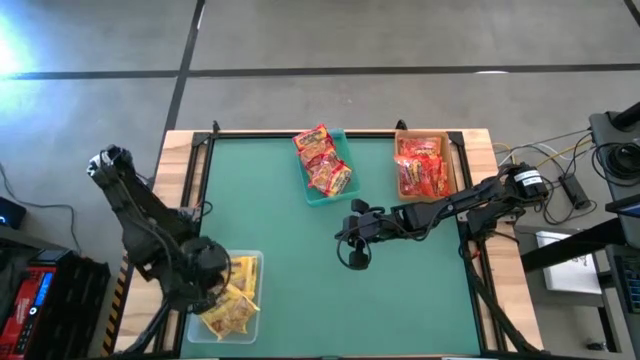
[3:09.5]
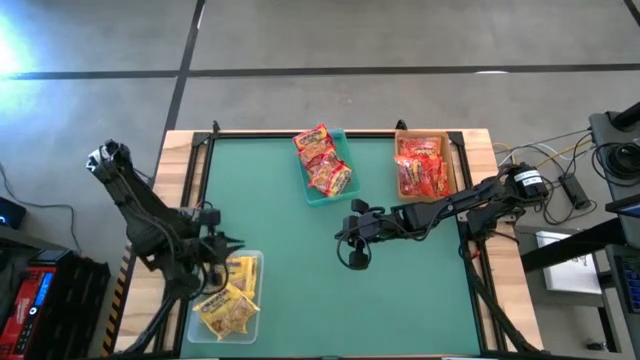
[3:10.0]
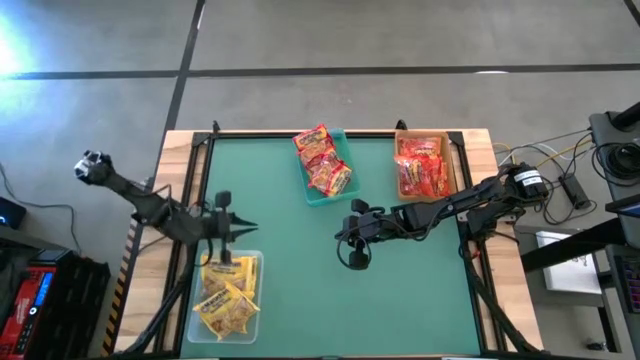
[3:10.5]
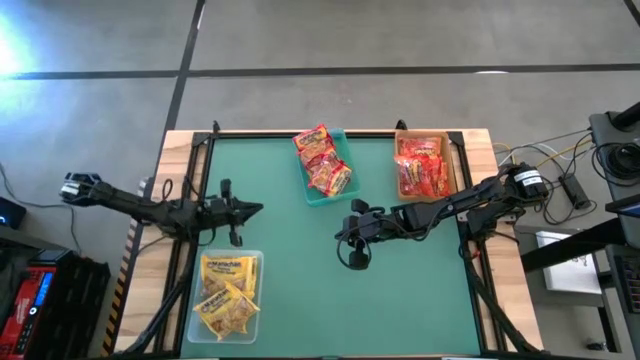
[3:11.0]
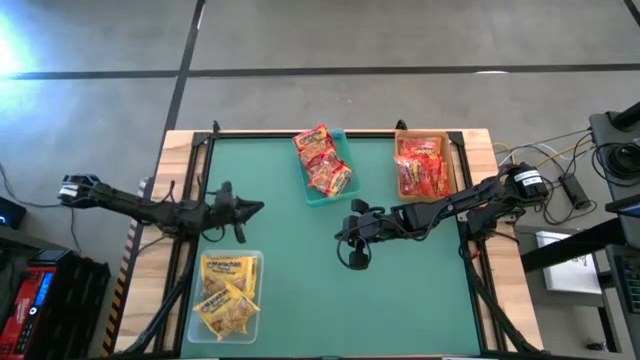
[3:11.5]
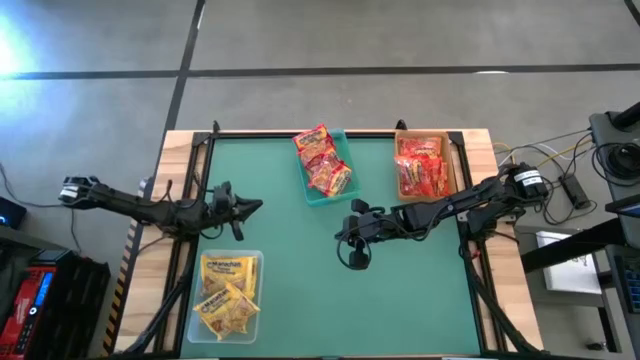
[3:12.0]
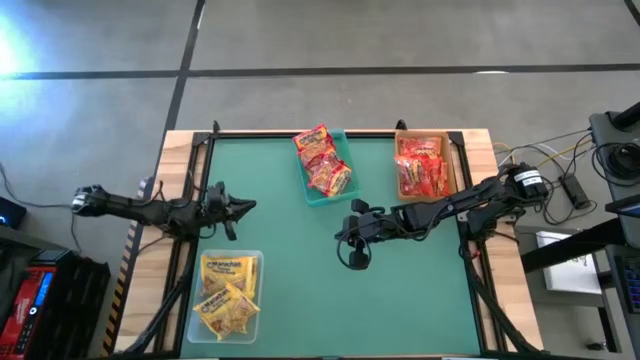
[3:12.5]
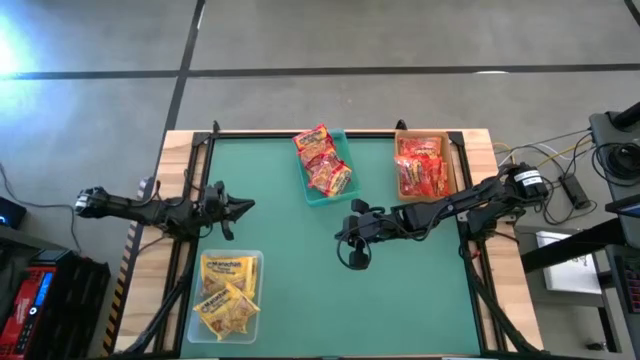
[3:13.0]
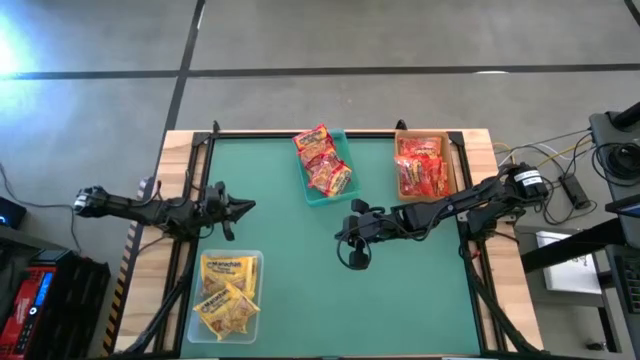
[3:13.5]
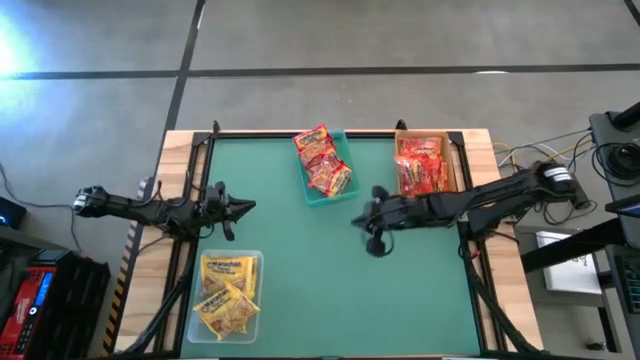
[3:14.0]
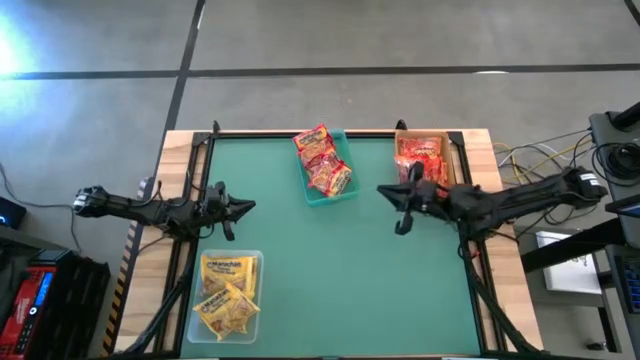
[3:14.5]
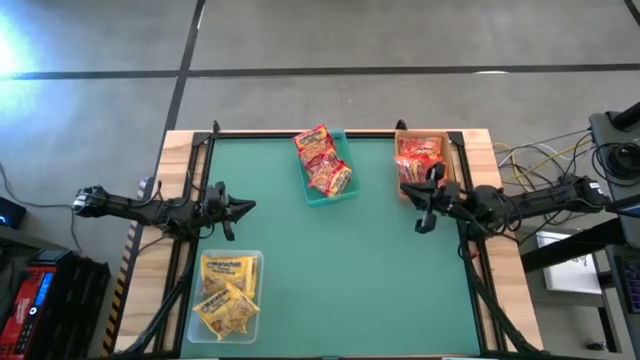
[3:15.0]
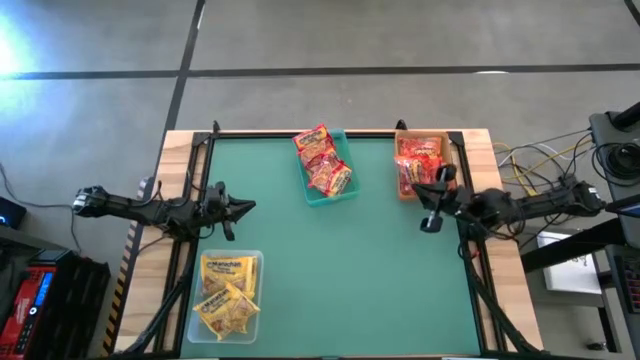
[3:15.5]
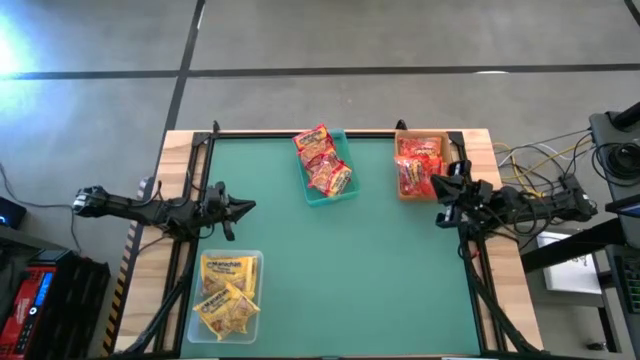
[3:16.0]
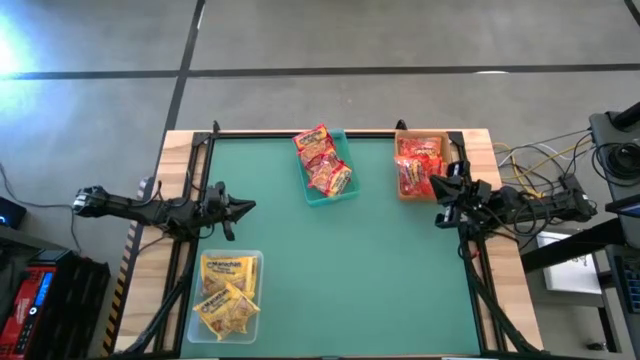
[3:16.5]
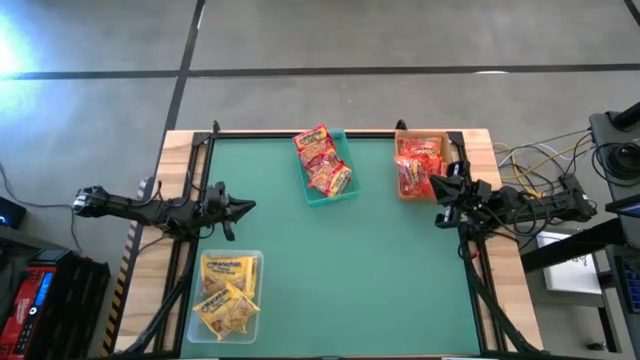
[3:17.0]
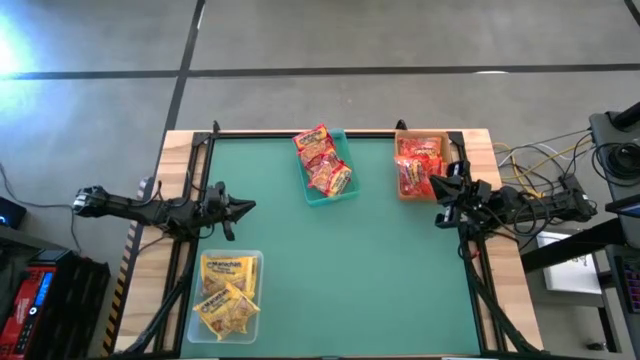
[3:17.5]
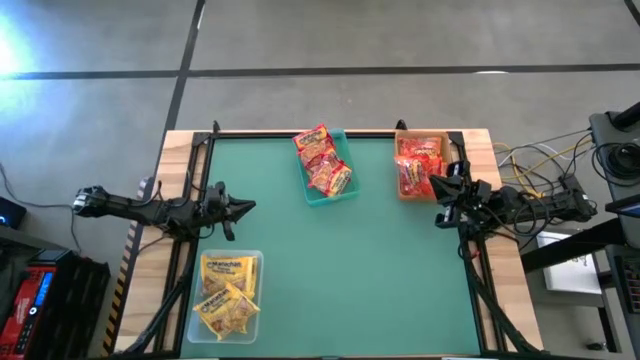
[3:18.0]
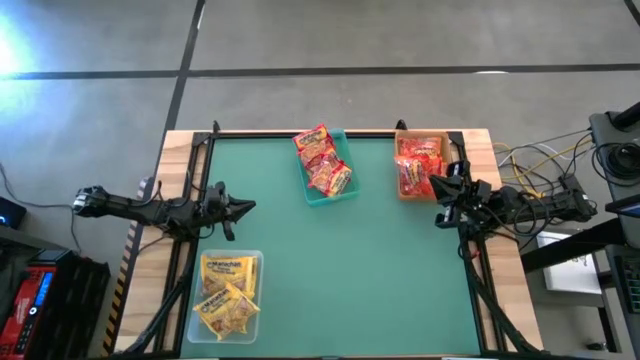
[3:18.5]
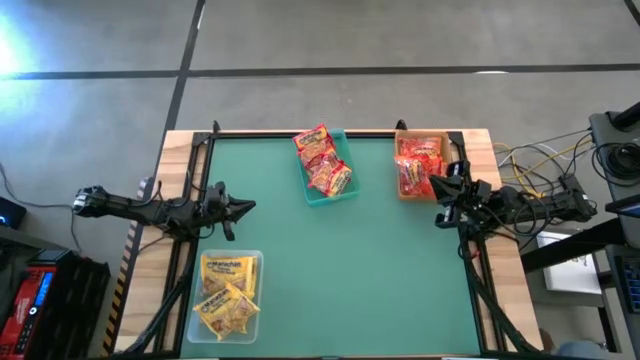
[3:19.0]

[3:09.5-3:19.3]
Task: Sort Maruchan noodles
Return to Home Position

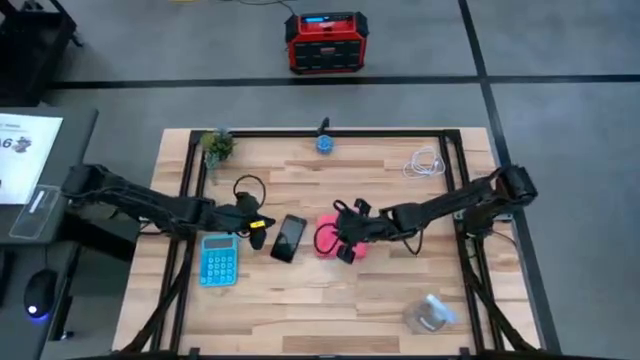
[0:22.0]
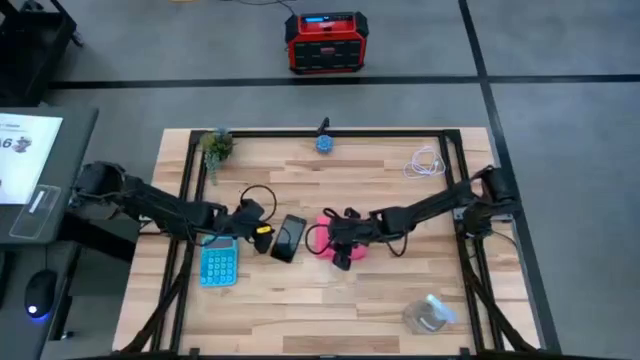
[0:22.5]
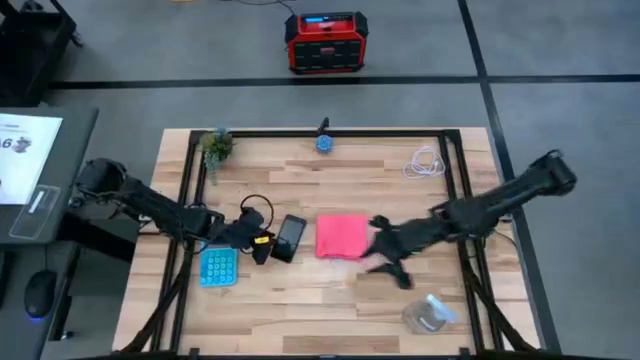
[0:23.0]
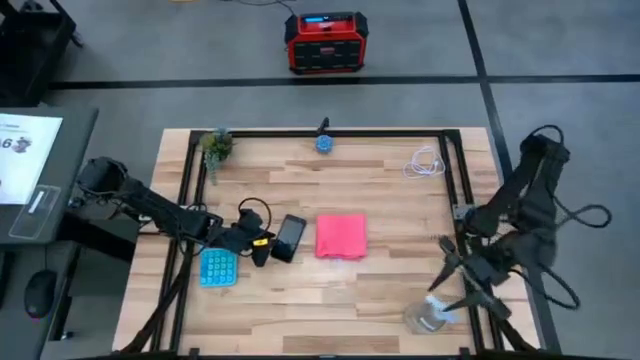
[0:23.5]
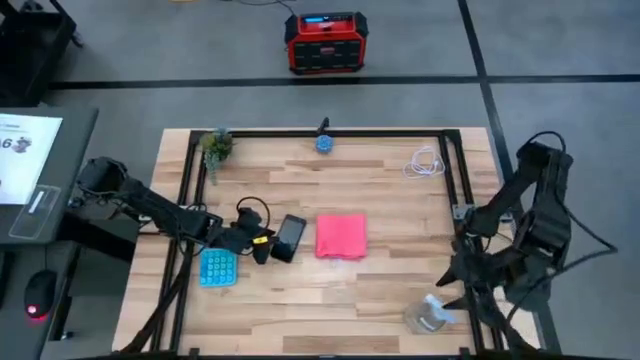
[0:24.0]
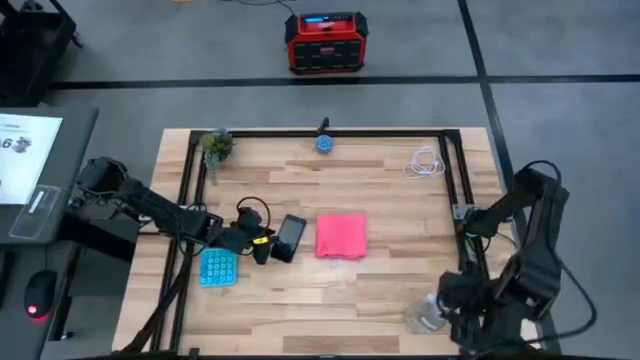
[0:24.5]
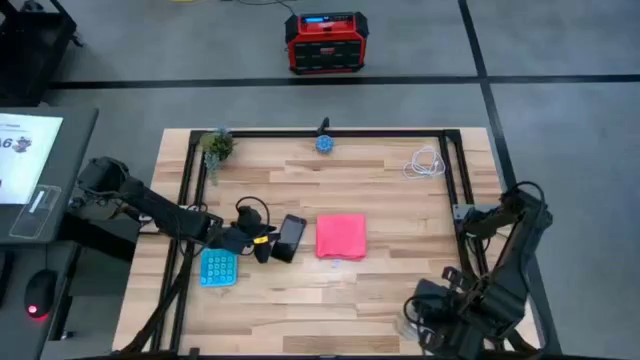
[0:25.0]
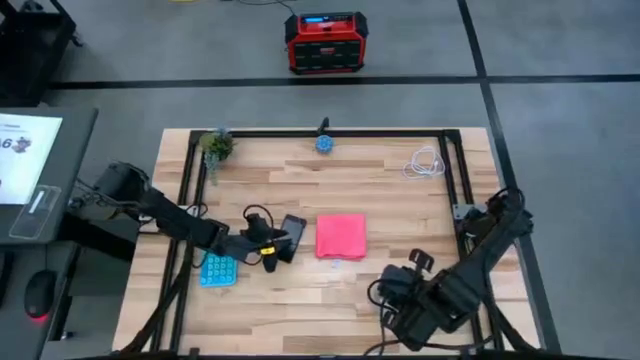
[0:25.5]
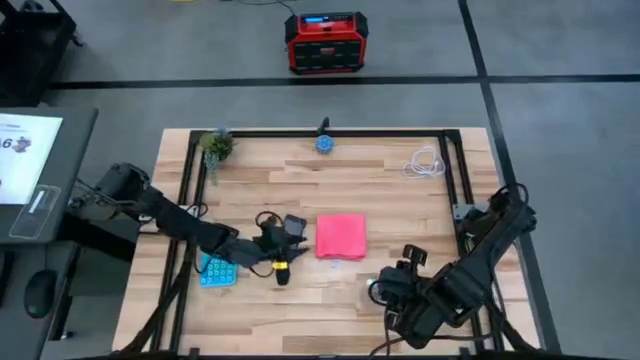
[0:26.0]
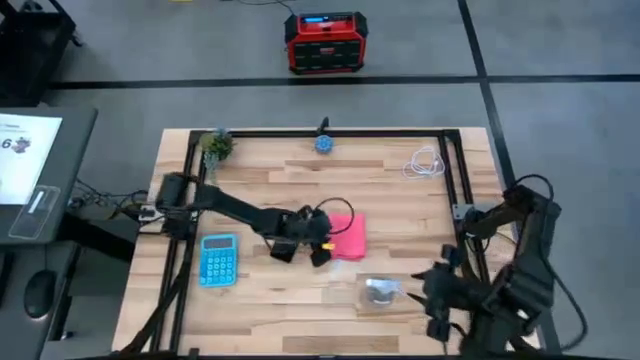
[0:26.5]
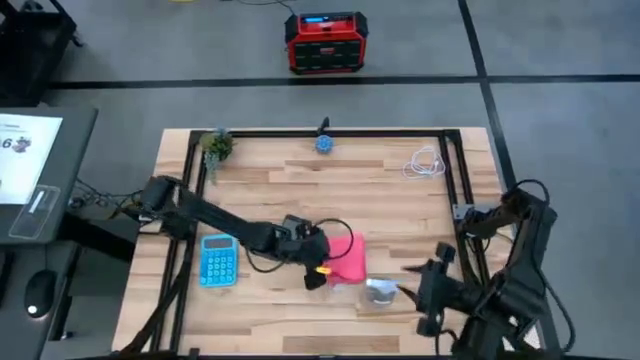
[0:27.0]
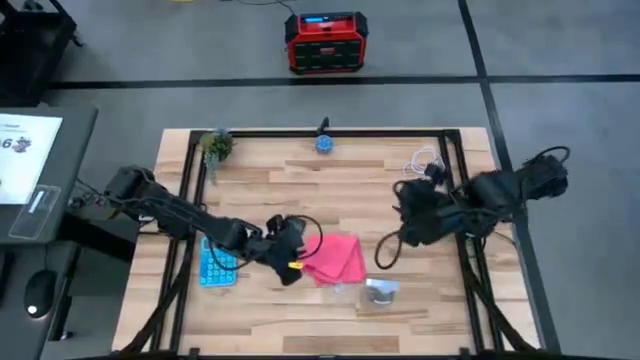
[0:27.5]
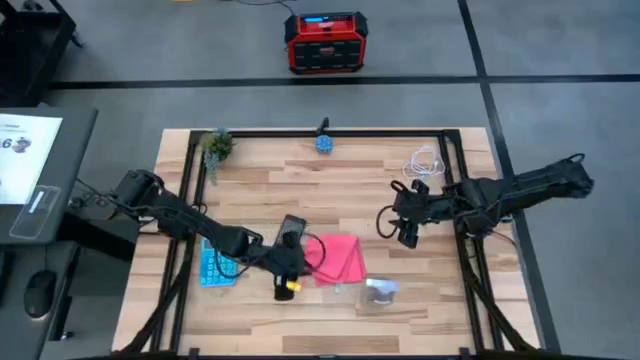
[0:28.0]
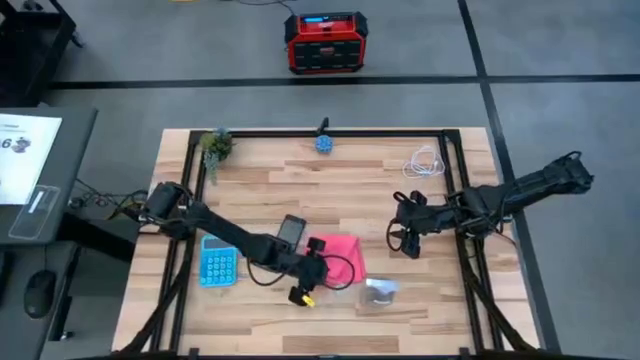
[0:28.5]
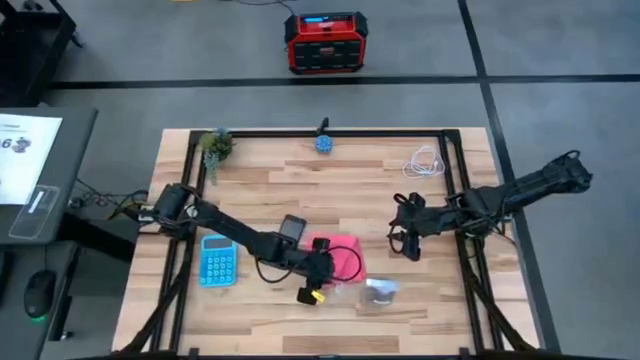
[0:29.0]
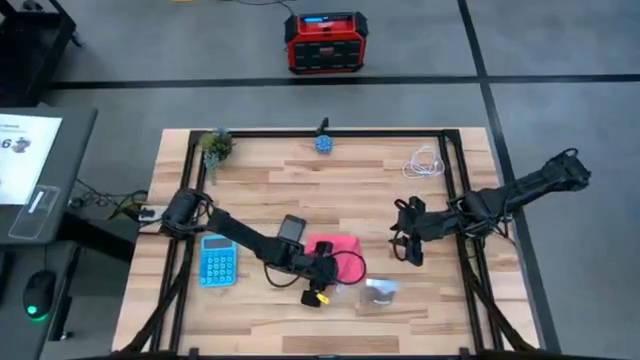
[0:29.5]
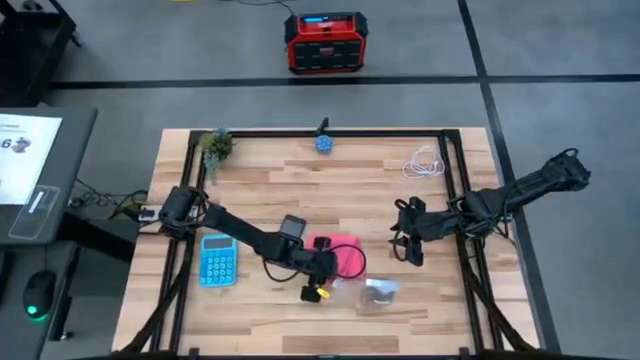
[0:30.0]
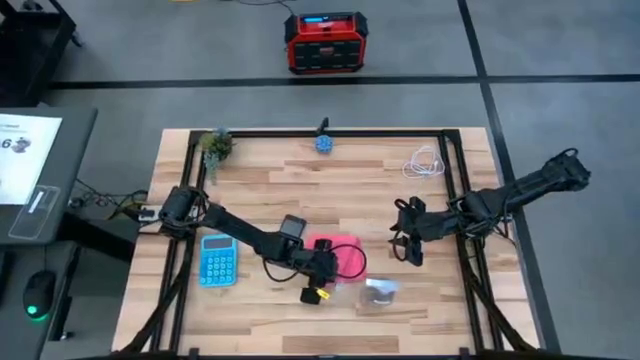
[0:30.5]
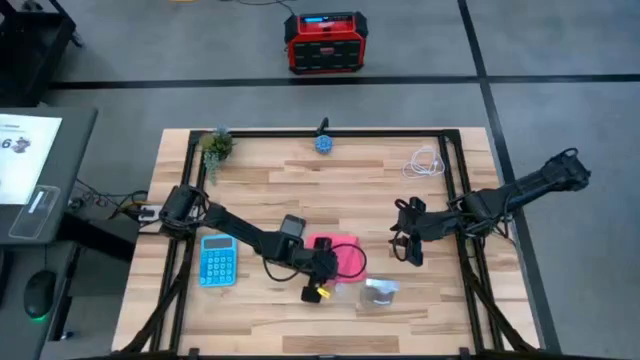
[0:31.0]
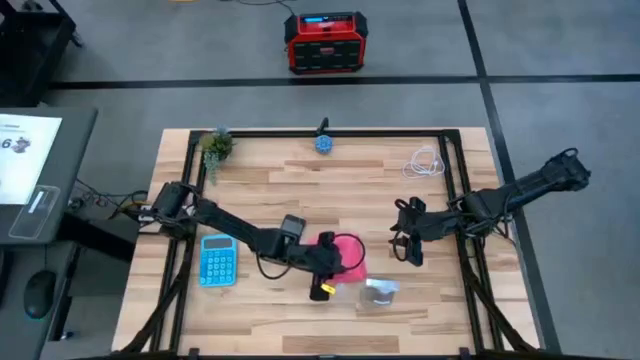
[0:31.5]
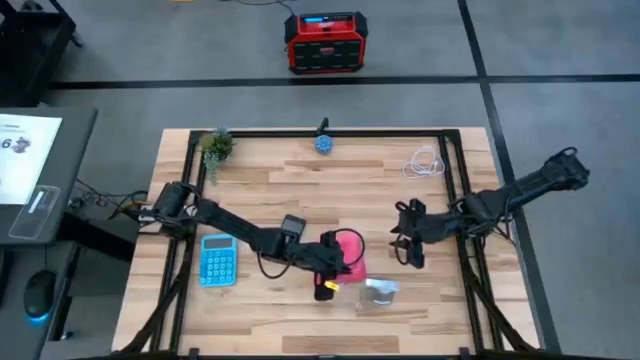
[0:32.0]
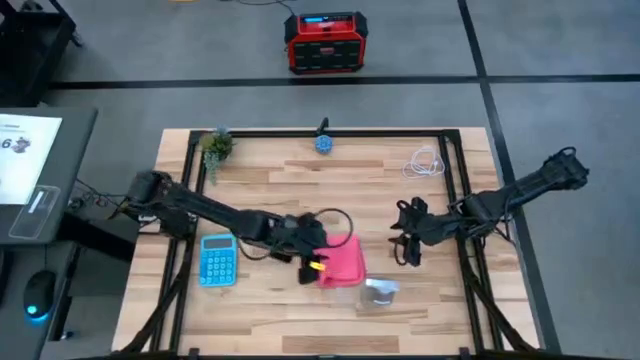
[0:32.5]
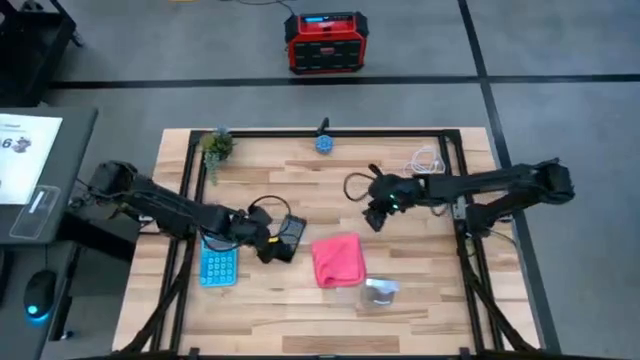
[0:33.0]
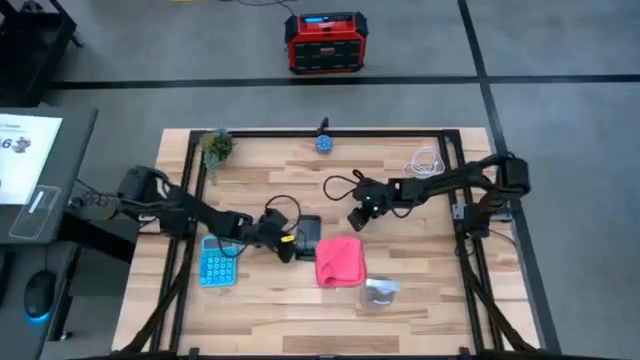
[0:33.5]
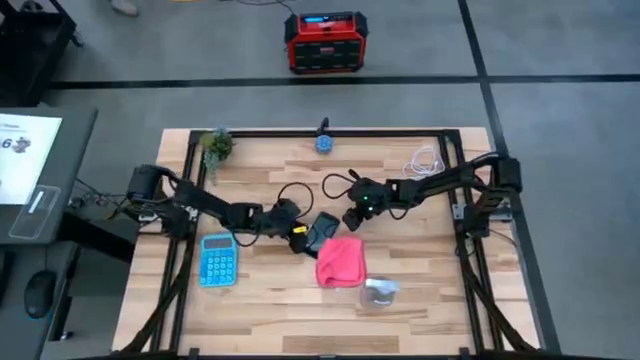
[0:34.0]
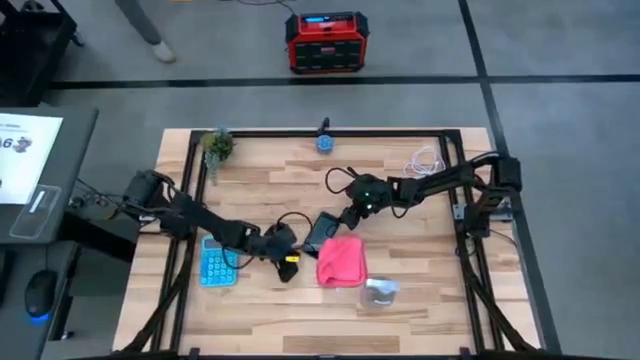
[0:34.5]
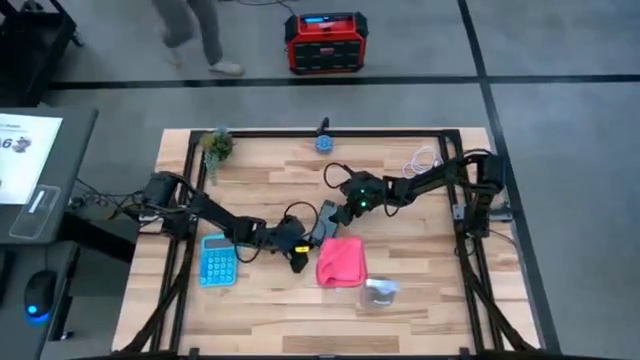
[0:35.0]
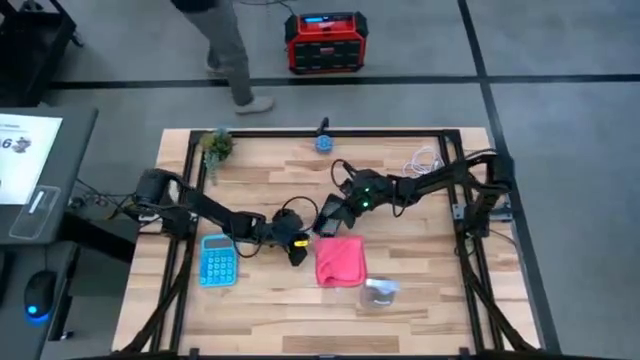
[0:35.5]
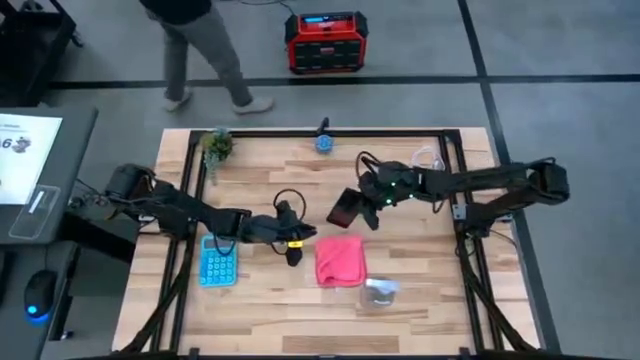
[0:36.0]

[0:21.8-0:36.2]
Task: Apply microfiber cloth
Spray the front of the black cellphone using transparent spray bottle
